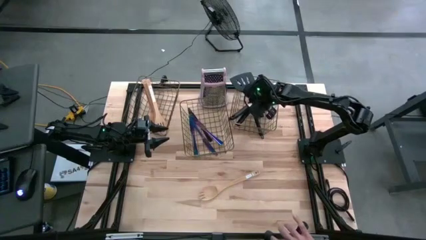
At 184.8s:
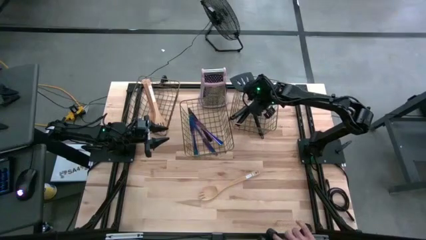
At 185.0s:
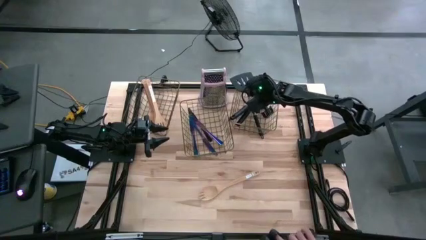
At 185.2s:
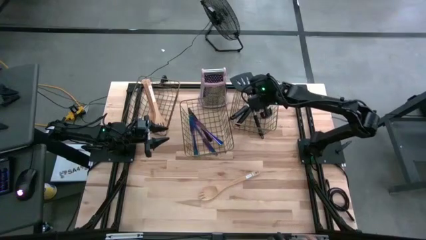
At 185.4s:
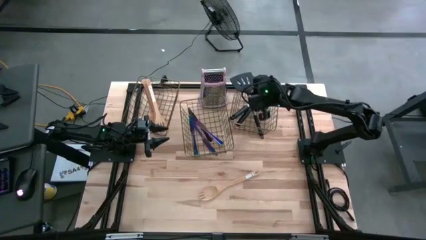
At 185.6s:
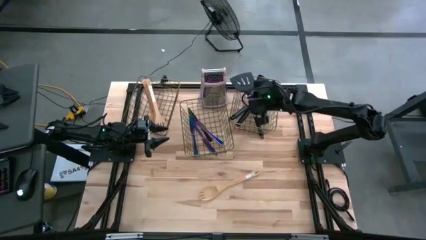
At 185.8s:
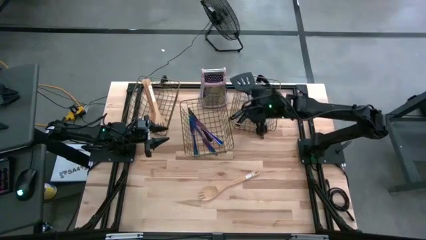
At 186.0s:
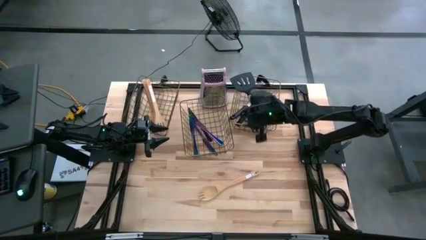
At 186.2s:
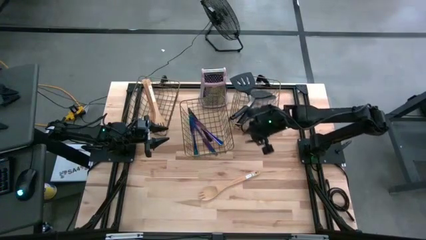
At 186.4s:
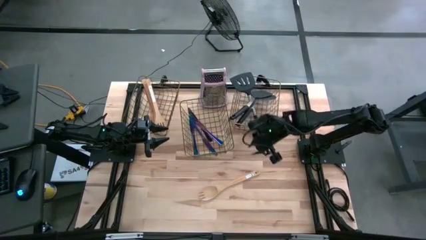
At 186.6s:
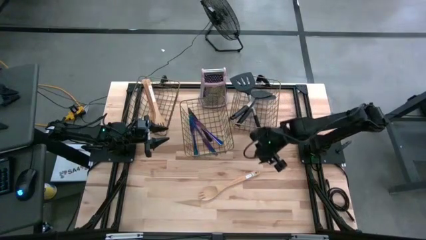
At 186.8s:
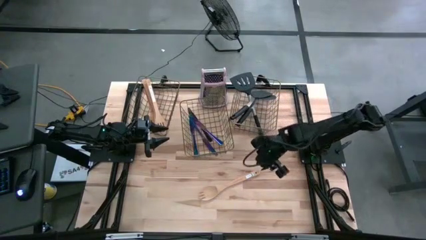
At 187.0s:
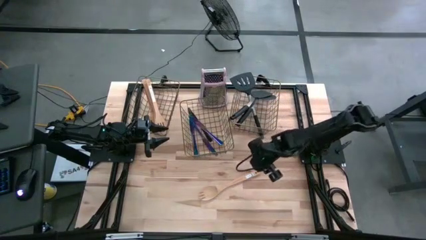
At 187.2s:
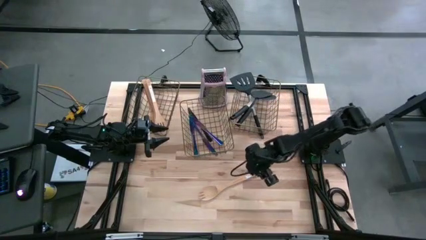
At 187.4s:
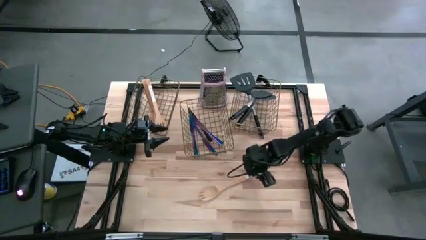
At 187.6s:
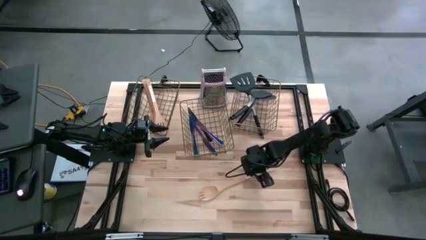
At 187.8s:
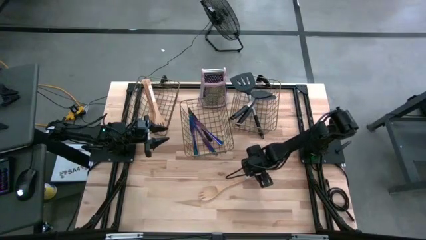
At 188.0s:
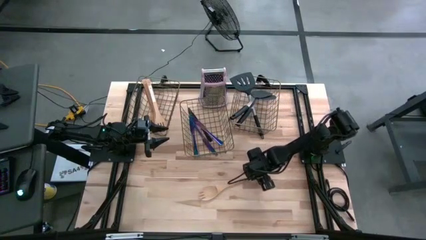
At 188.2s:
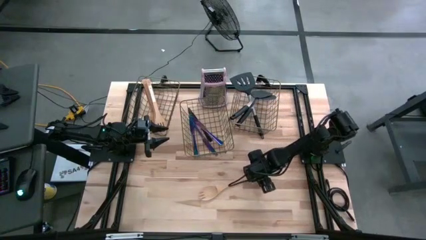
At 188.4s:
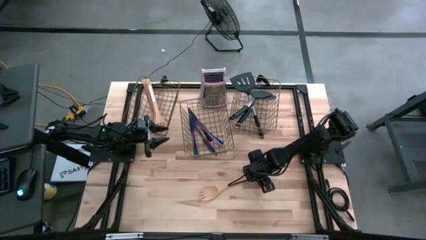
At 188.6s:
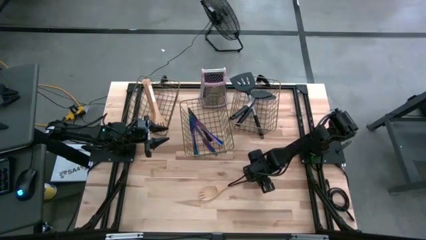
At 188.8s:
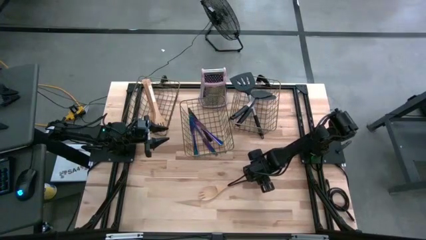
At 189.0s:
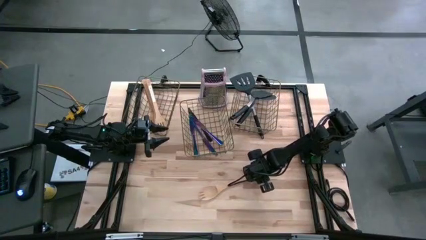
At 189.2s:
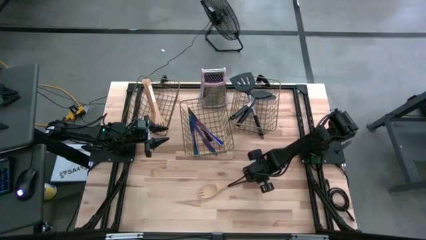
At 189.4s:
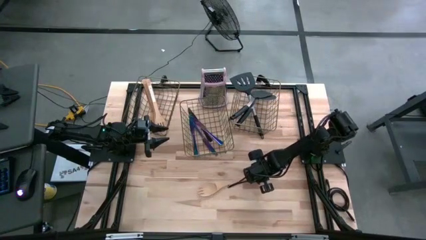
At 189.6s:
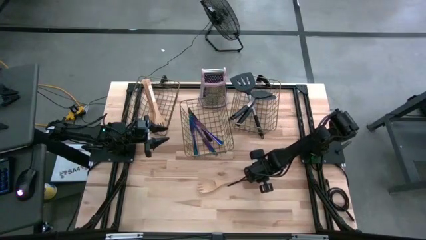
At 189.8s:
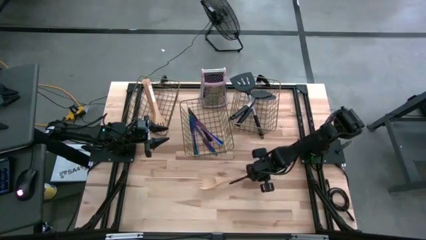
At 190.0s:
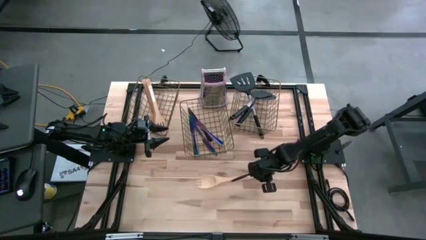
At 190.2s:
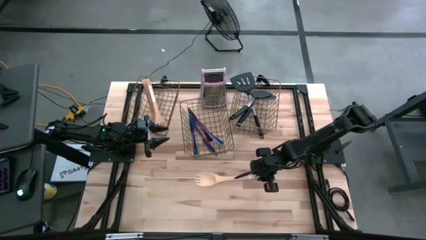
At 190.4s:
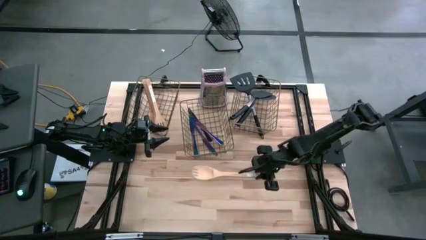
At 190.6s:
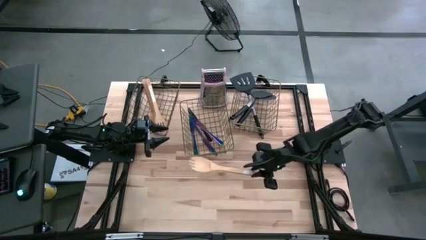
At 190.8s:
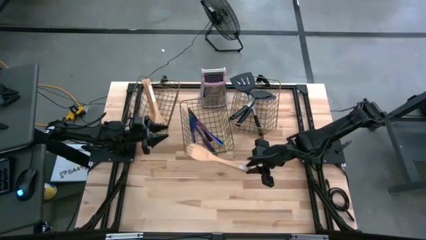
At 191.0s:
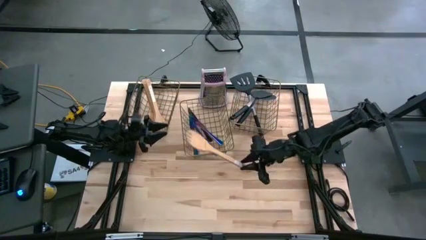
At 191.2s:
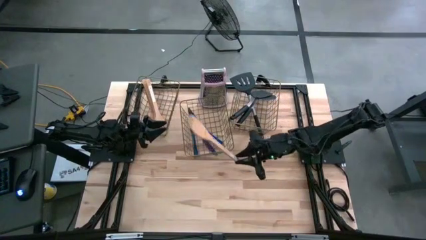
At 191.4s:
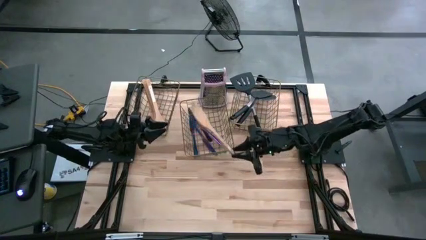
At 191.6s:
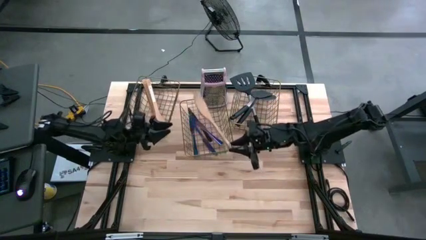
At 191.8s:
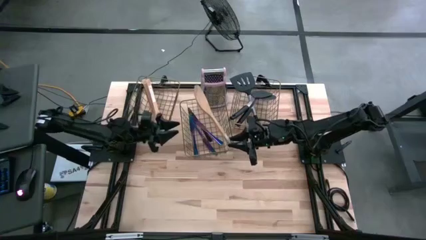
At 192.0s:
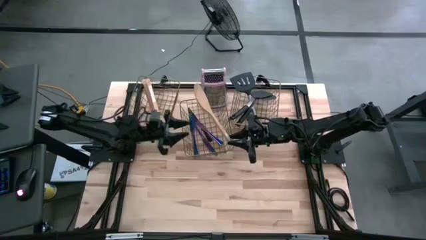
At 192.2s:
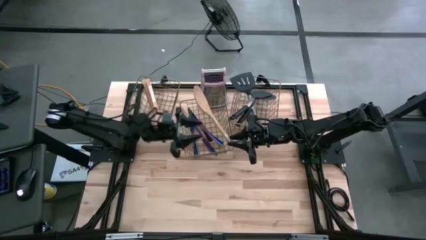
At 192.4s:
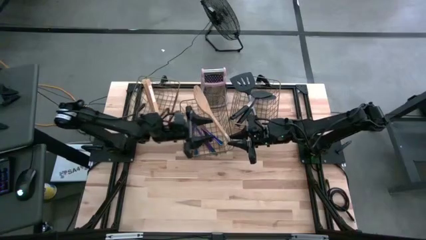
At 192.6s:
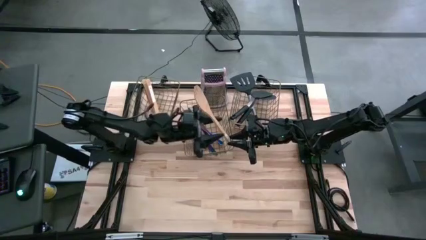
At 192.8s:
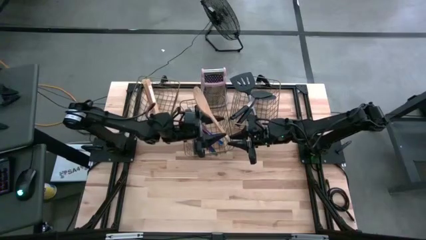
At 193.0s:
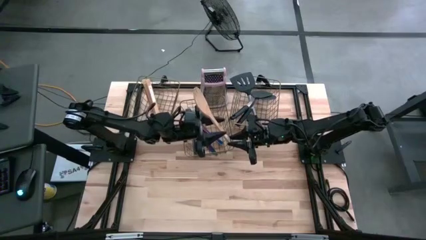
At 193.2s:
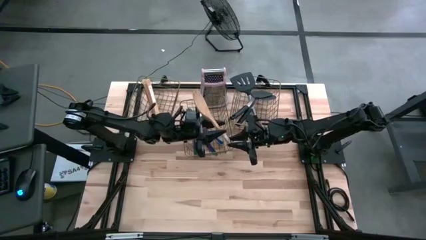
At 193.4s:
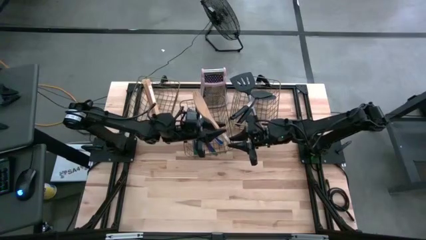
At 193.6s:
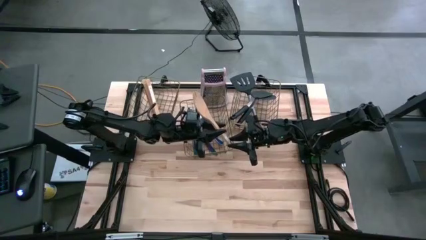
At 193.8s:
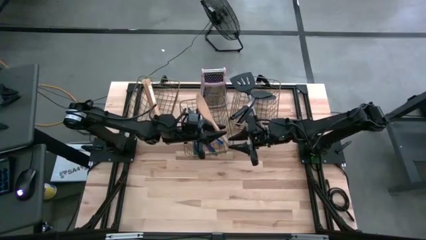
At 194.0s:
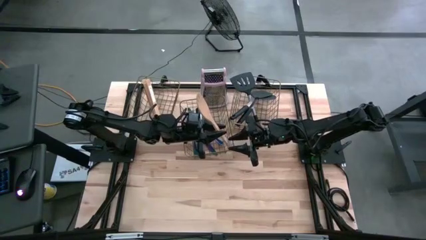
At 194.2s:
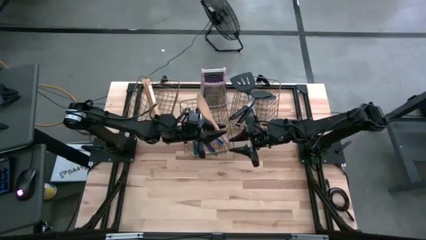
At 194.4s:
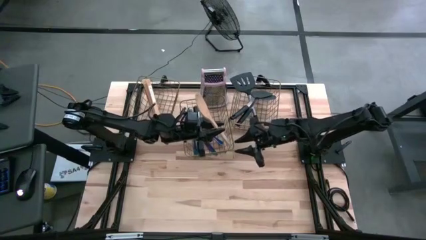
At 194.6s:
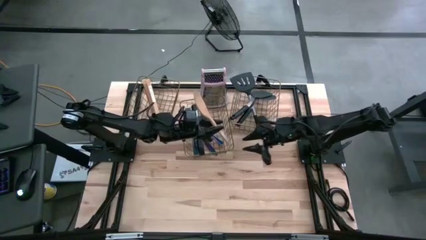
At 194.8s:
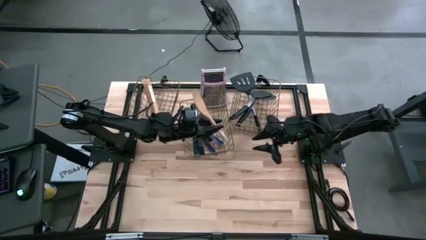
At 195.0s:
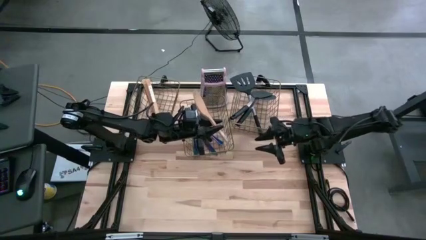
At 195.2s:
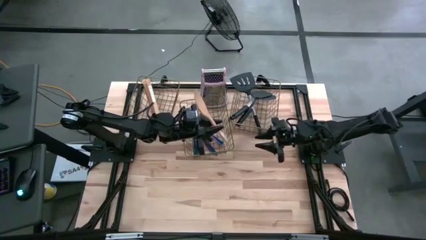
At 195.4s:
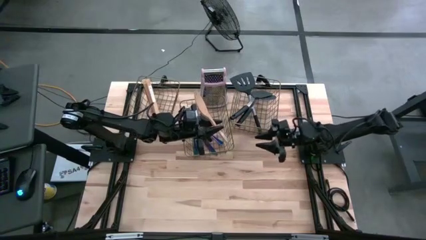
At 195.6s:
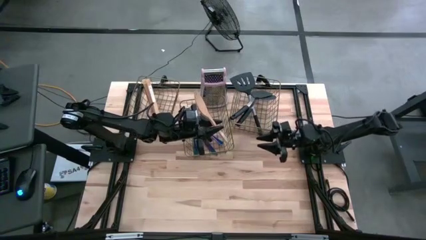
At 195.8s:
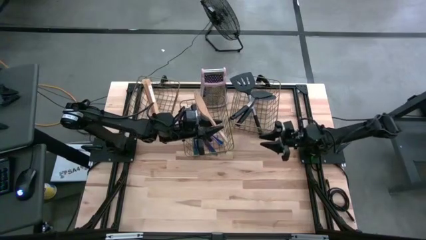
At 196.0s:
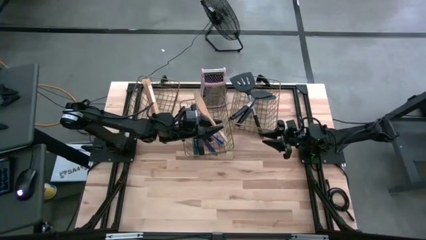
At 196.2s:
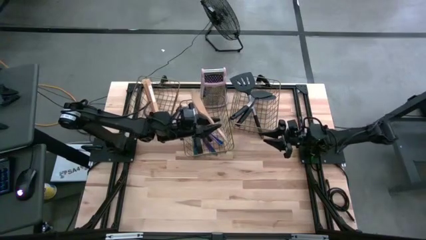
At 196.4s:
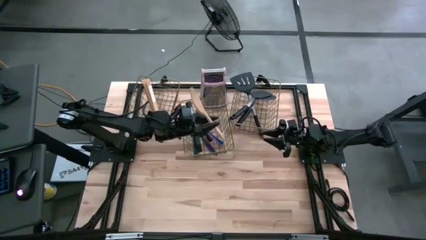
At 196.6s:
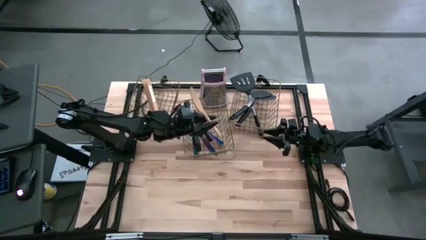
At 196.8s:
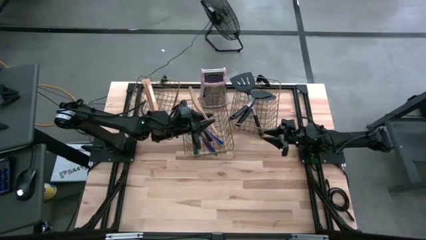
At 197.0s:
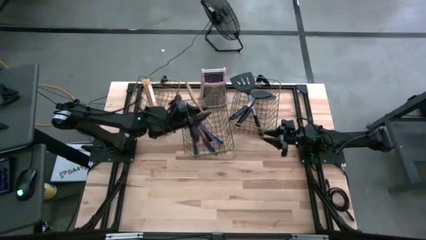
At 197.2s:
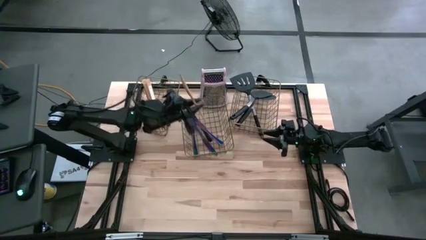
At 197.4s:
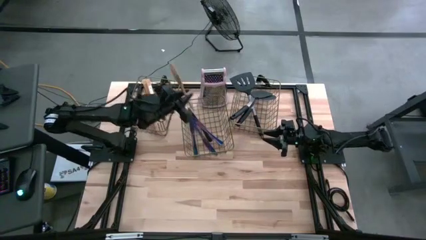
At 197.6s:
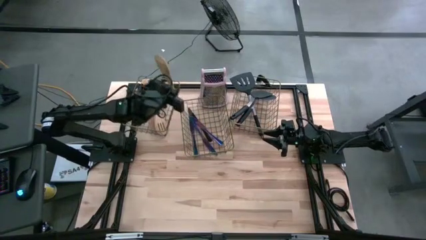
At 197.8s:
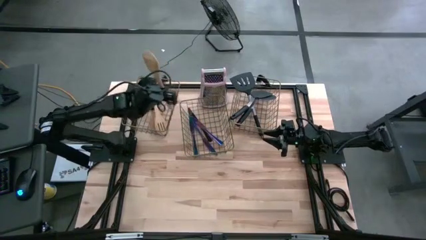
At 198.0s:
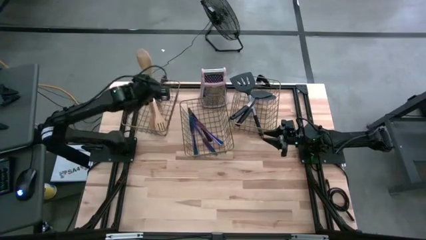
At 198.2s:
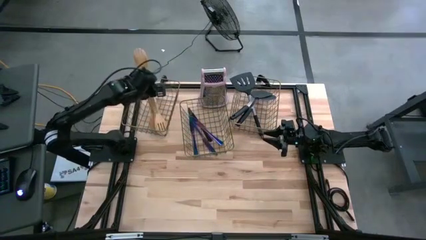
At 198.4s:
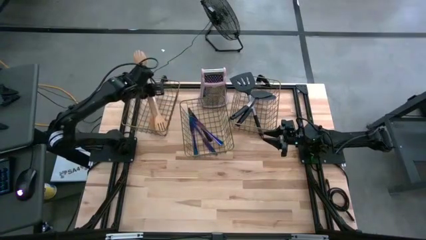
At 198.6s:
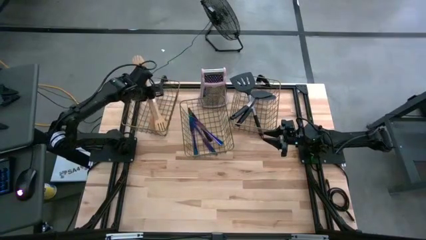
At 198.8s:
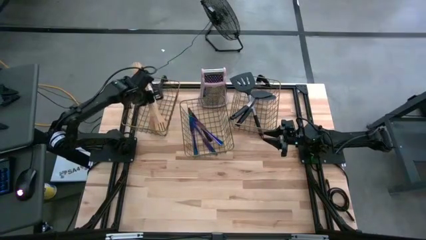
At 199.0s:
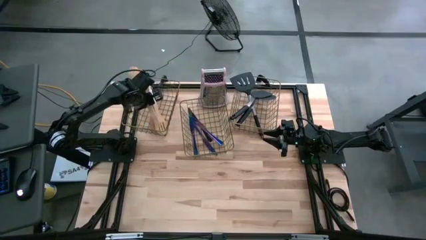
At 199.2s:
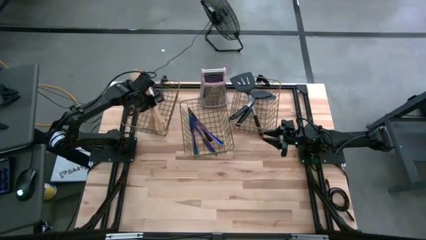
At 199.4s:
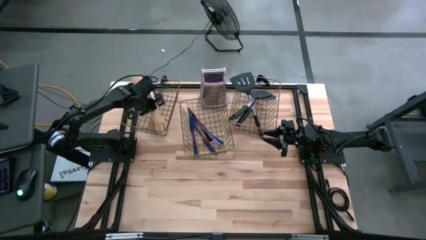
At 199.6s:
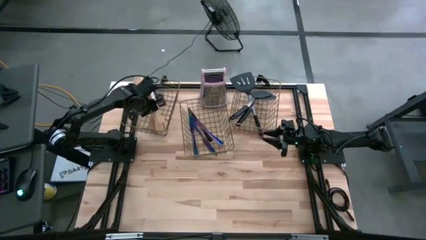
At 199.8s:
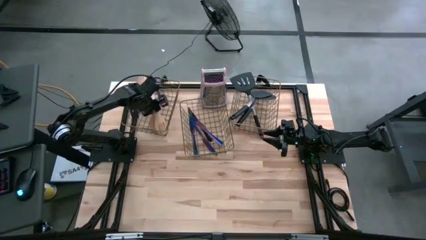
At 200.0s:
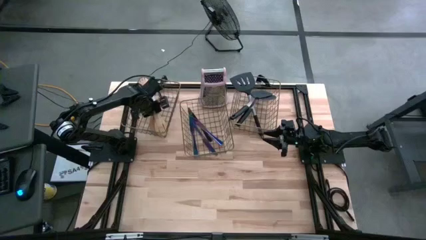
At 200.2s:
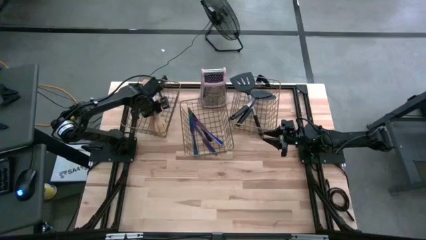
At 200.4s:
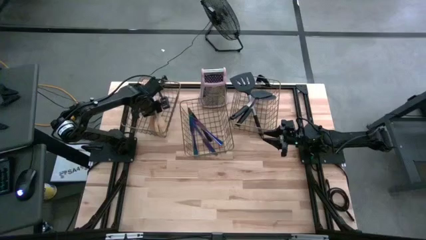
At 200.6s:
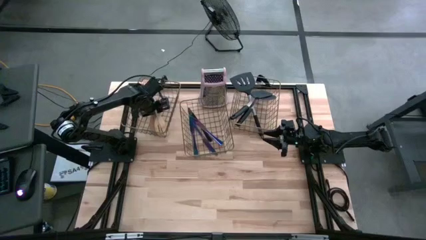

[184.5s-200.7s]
Task: Pick & Place Kitchen Items
Put the brown serving spoon into the left wire basket

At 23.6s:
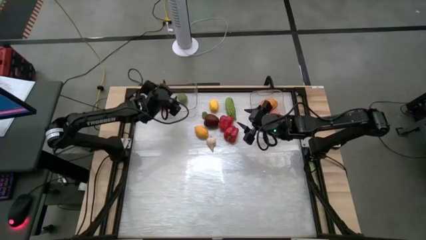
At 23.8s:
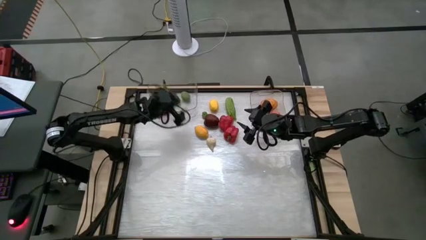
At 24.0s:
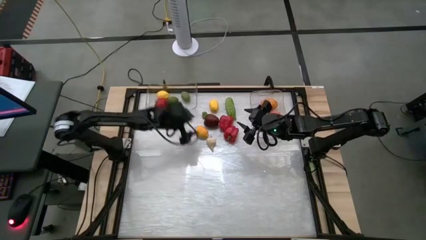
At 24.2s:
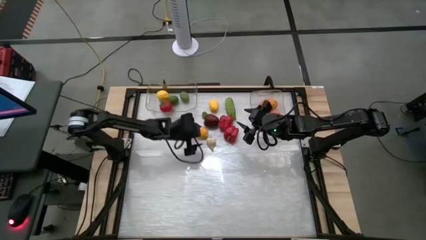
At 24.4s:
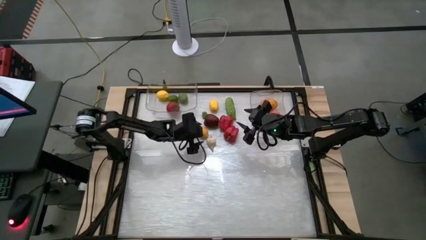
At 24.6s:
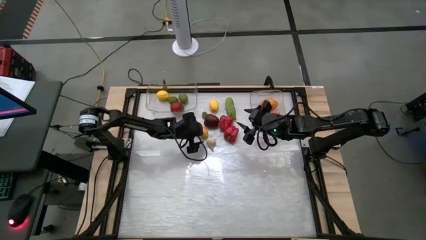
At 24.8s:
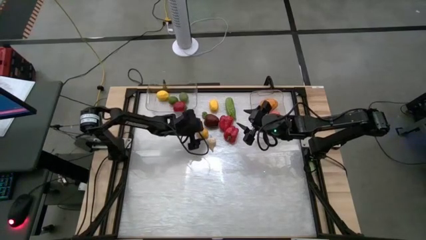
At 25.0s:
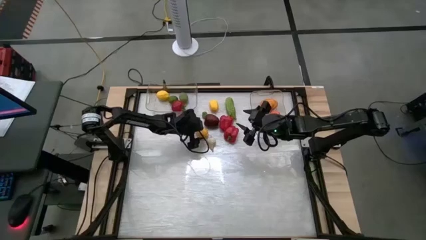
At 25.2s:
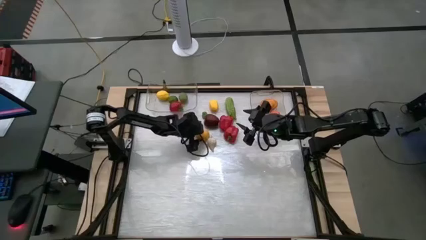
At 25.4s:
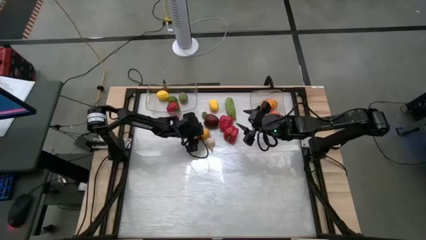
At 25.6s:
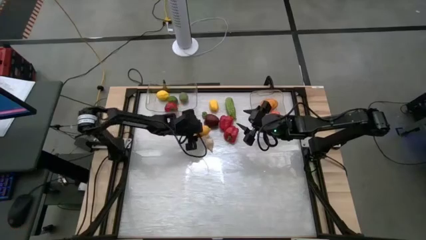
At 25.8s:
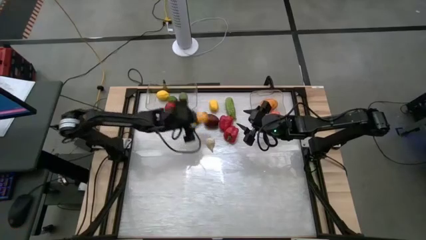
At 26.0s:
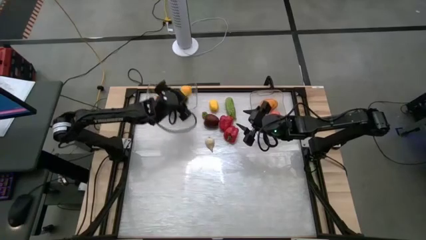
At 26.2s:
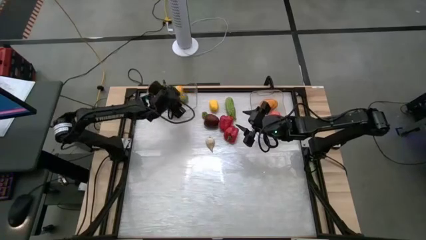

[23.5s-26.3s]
Task: Sort produce into baskets
Put the bottom yellow lemon into the left transparent bin
